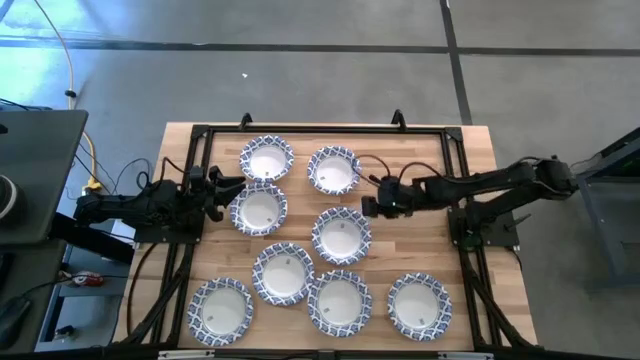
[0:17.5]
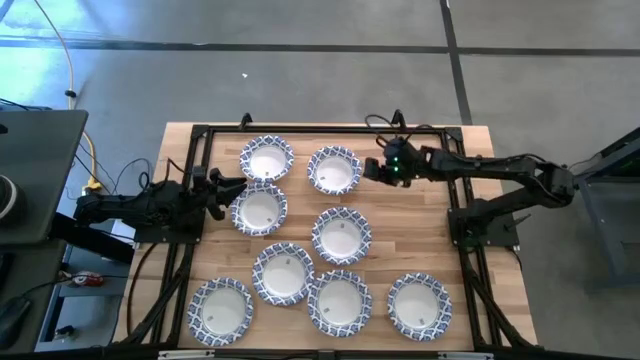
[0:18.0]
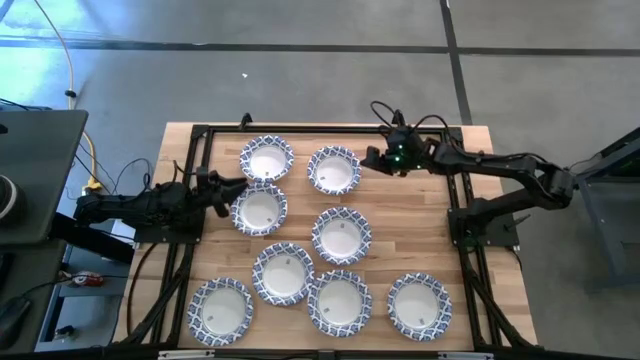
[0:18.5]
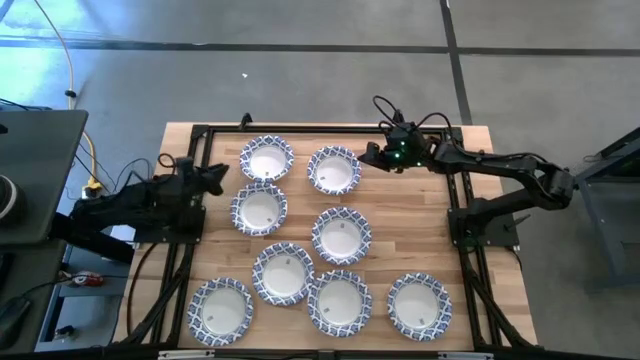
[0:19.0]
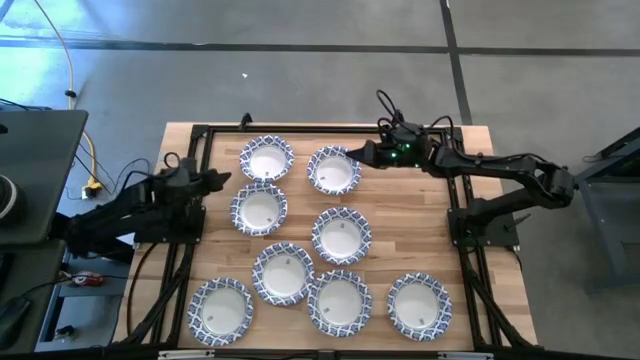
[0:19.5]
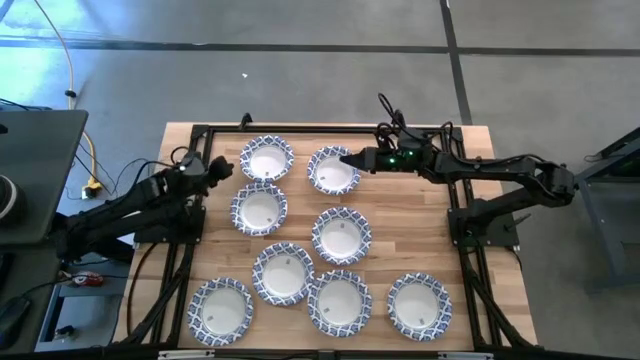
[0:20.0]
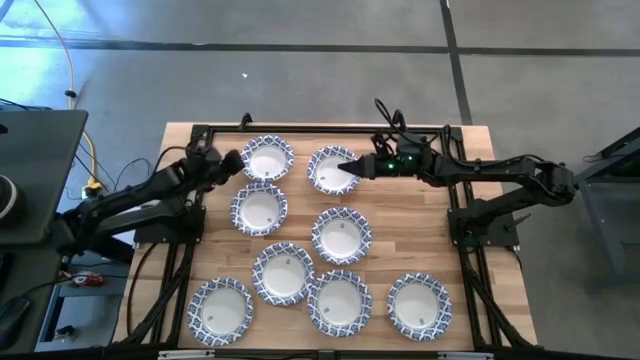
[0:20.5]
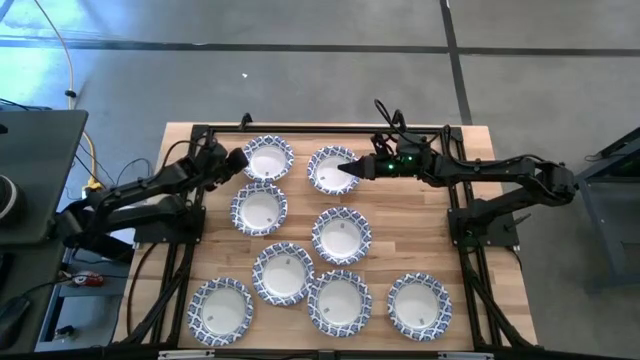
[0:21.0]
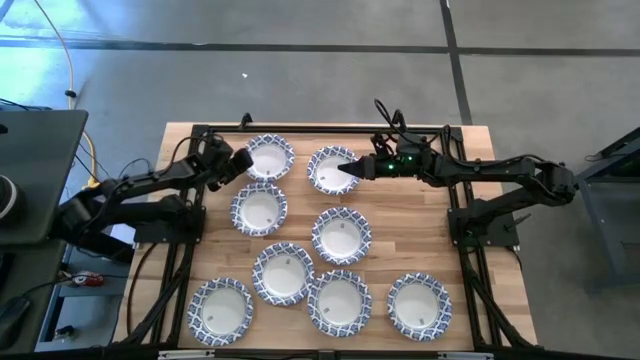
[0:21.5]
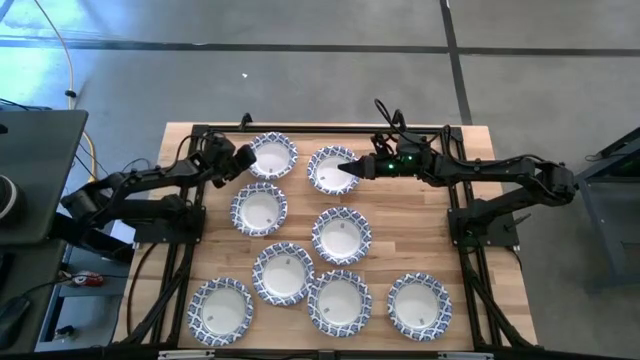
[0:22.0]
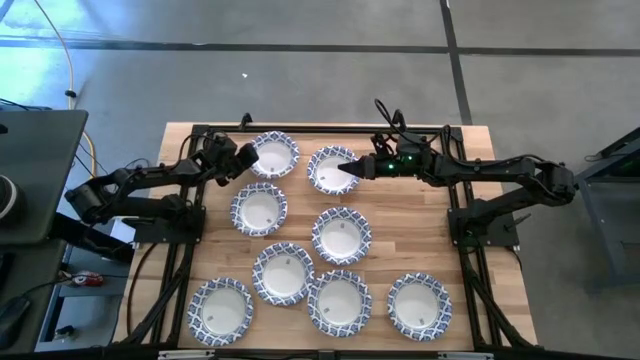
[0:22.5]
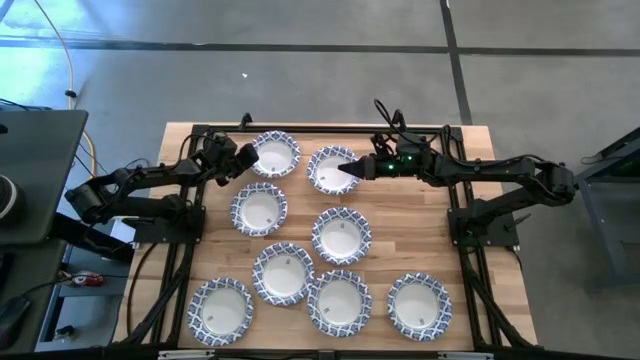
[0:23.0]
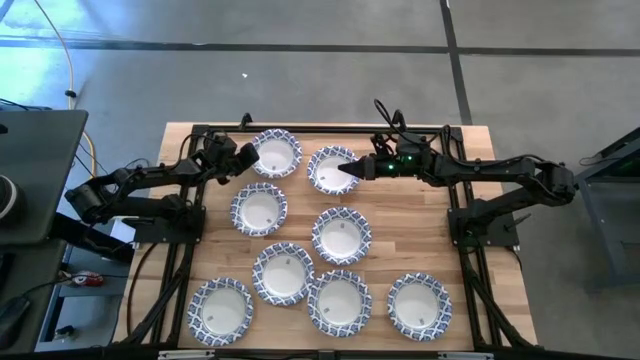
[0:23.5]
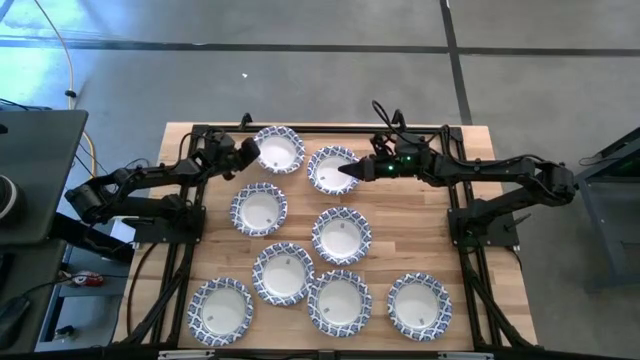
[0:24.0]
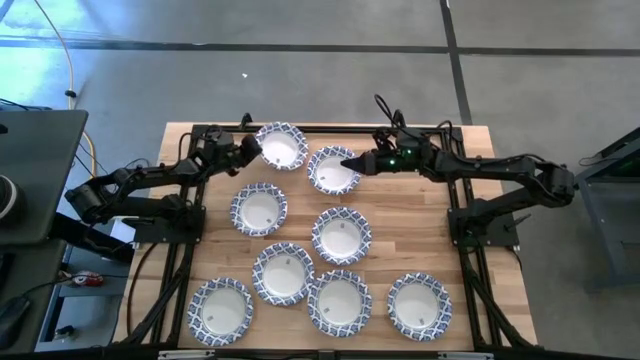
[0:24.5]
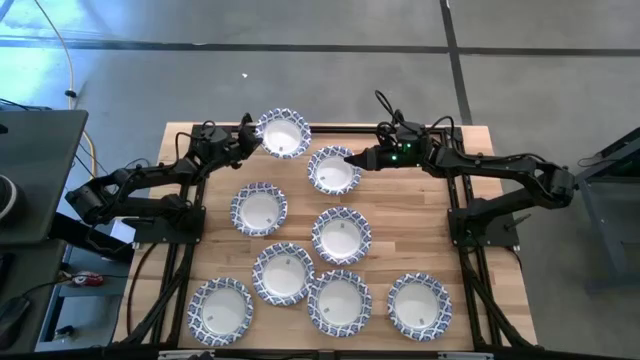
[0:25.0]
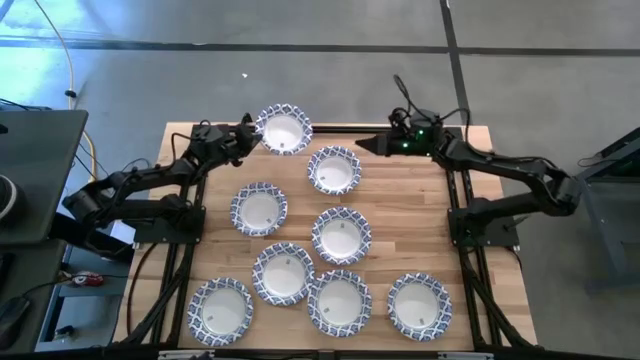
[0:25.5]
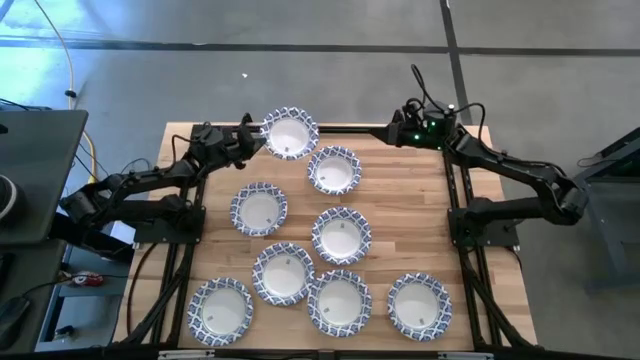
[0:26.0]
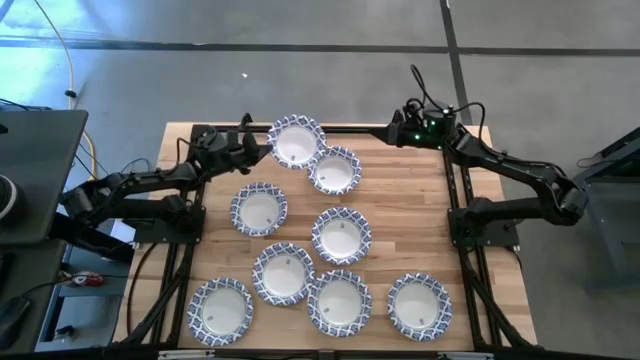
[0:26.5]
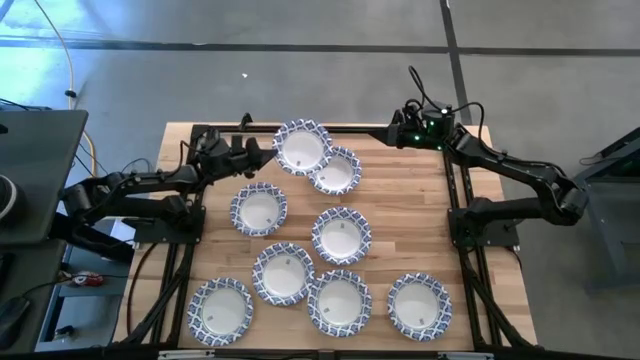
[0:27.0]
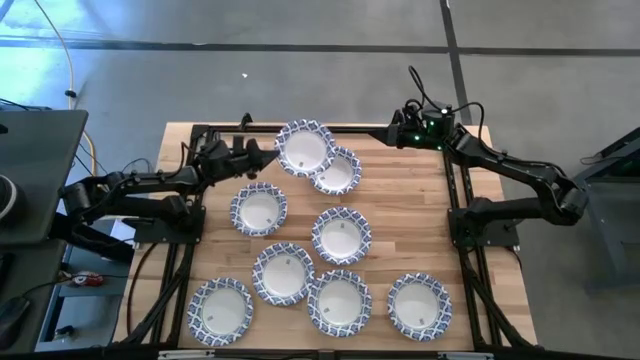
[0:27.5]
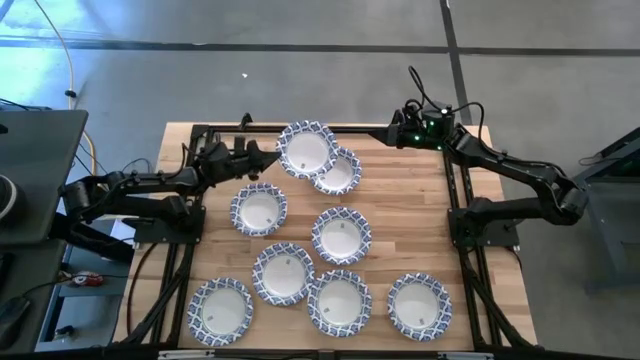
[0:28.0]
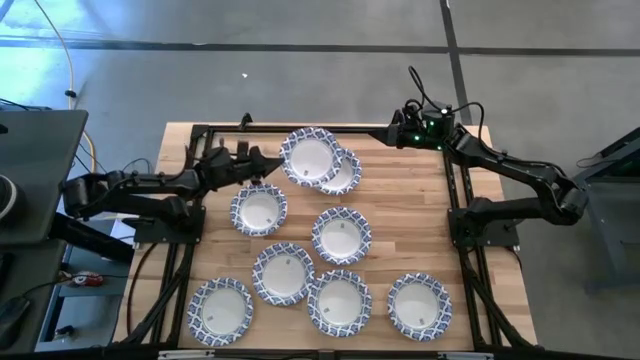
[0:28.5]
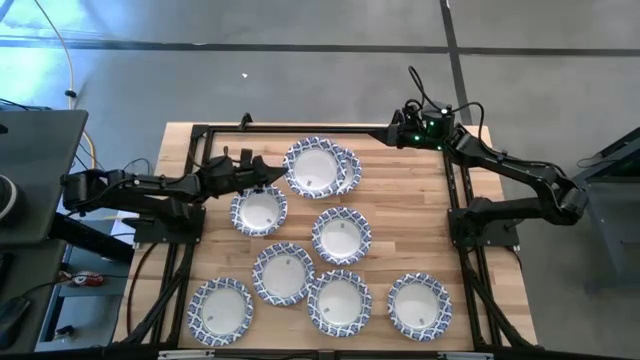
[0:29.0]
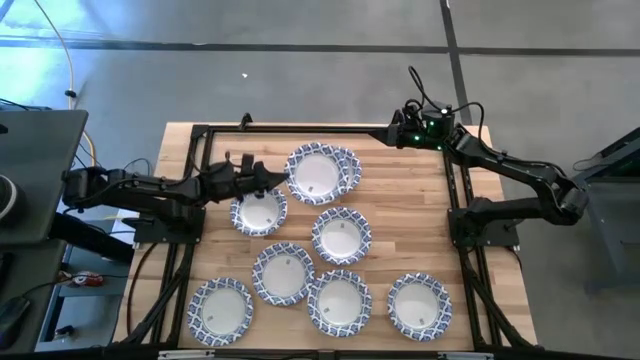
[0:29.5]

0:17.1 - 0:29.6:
Task: Nest bowls inside each other
Stack the white patterned bowl on top of the other white patterned bowls

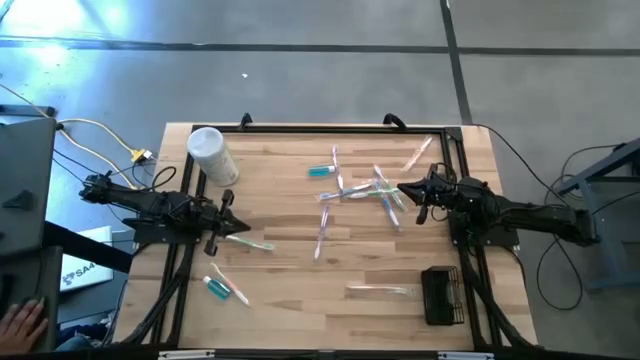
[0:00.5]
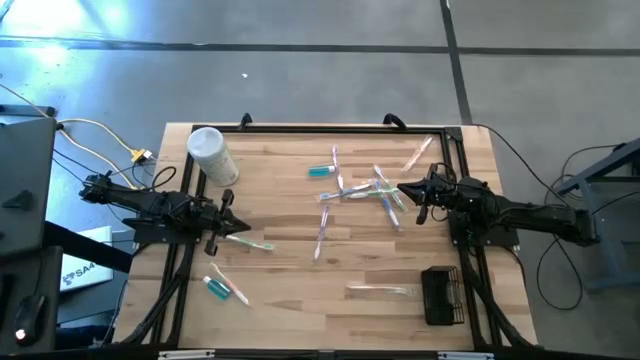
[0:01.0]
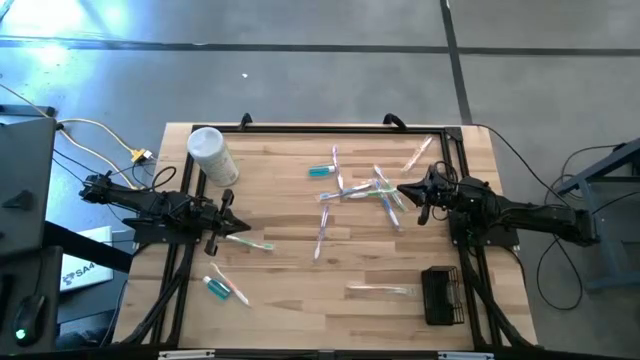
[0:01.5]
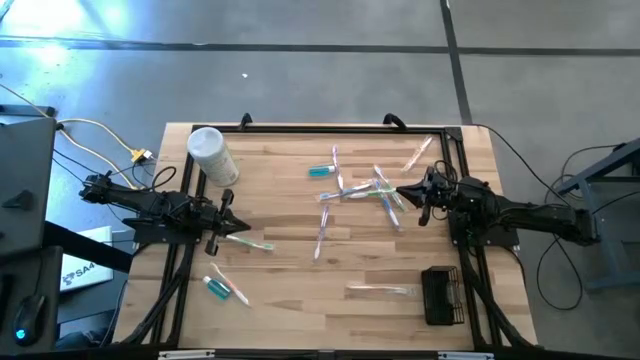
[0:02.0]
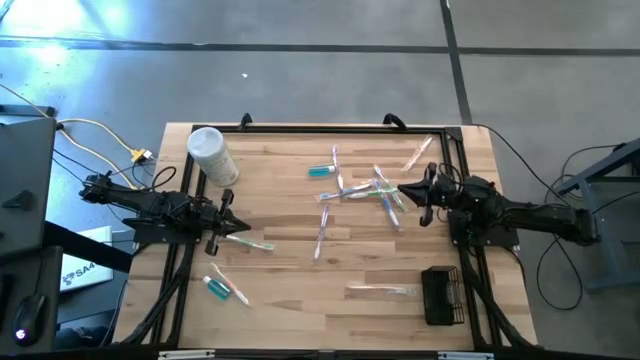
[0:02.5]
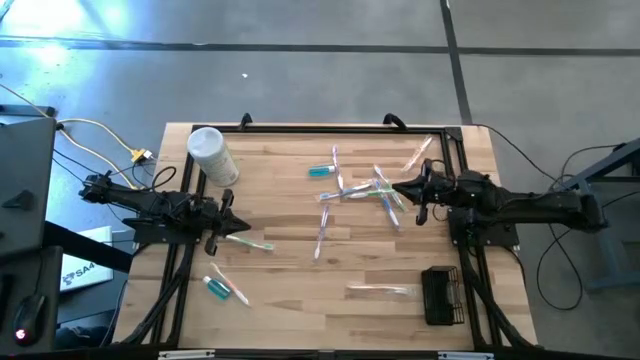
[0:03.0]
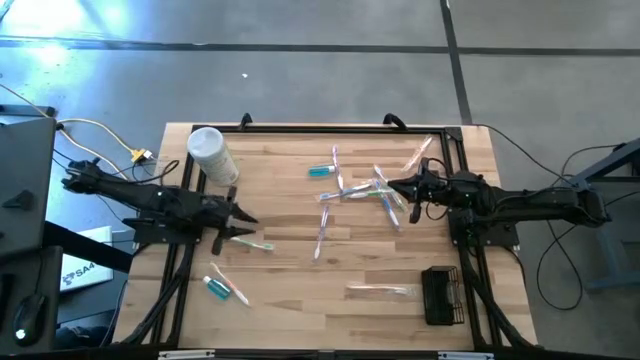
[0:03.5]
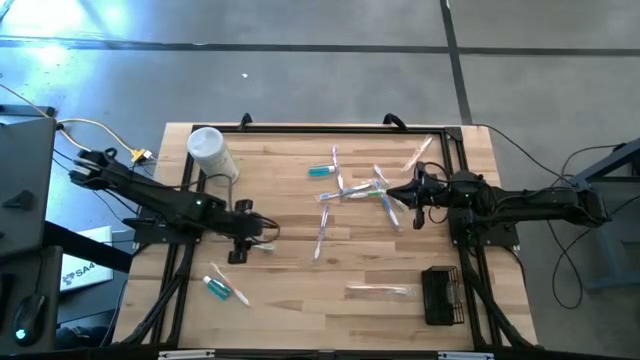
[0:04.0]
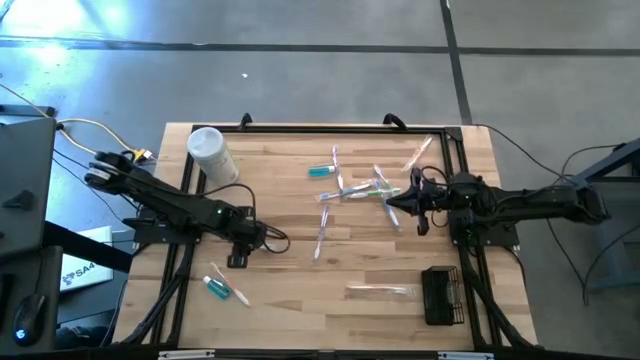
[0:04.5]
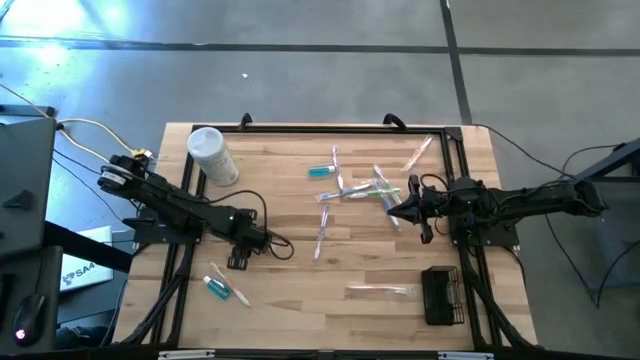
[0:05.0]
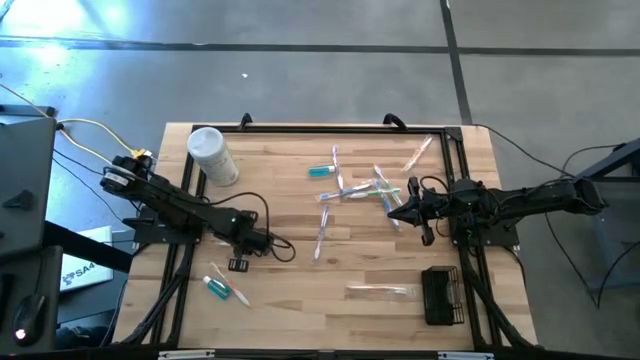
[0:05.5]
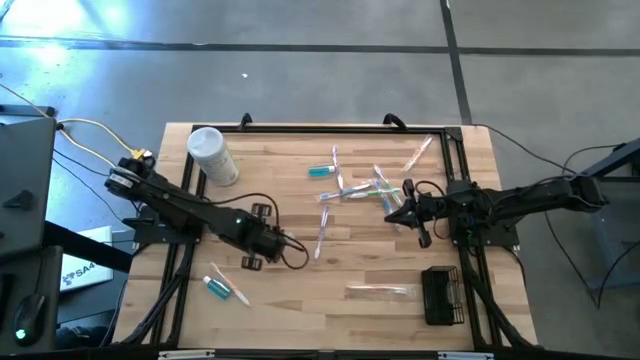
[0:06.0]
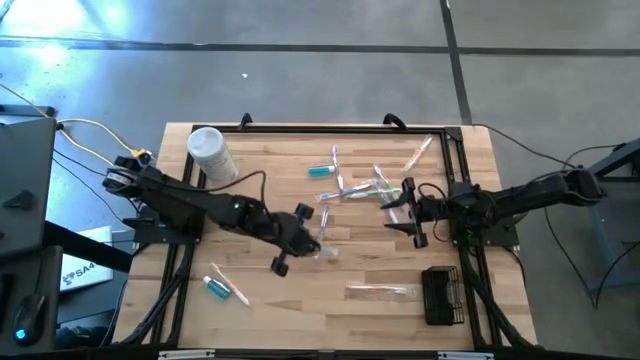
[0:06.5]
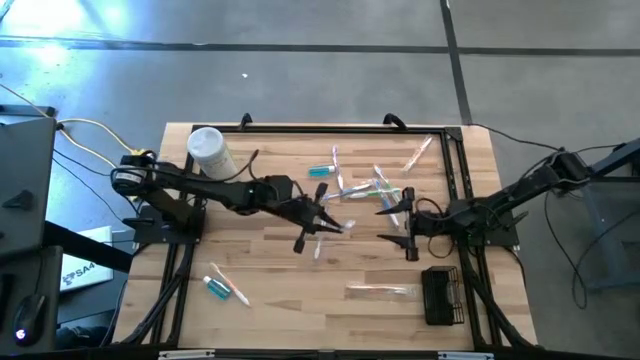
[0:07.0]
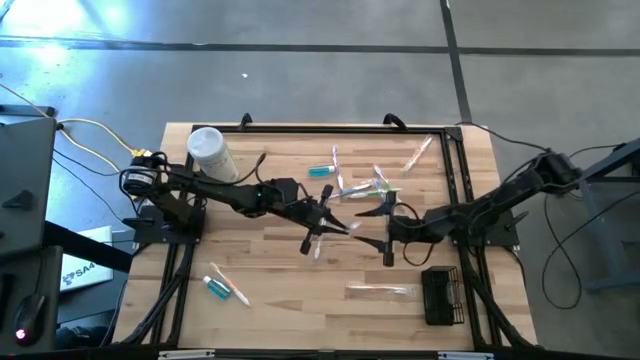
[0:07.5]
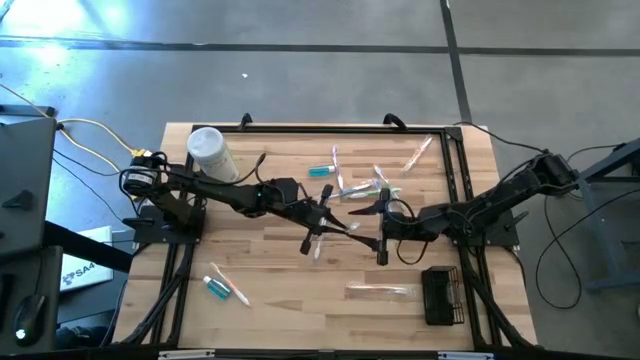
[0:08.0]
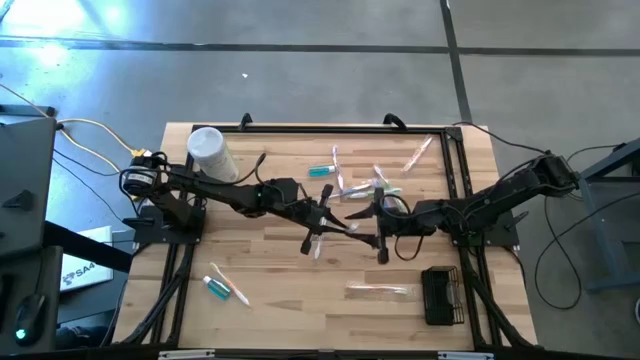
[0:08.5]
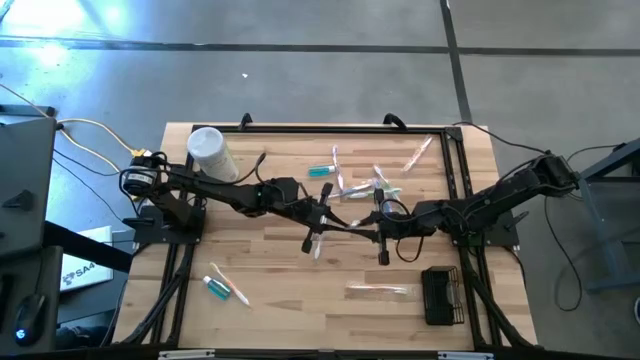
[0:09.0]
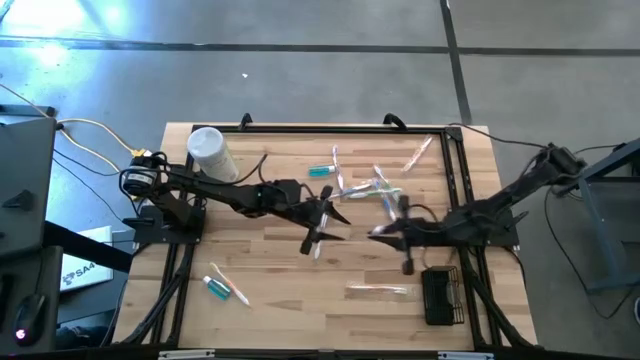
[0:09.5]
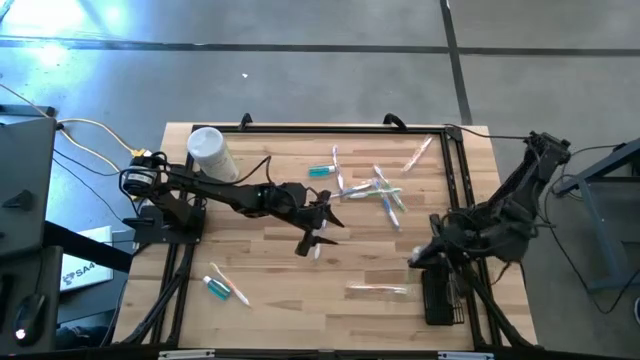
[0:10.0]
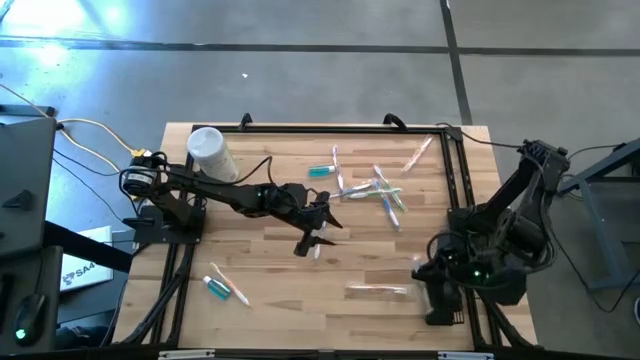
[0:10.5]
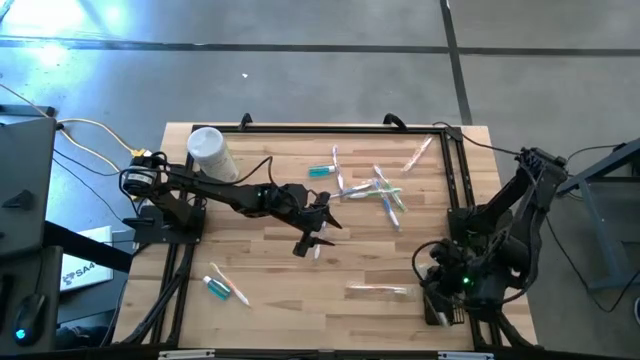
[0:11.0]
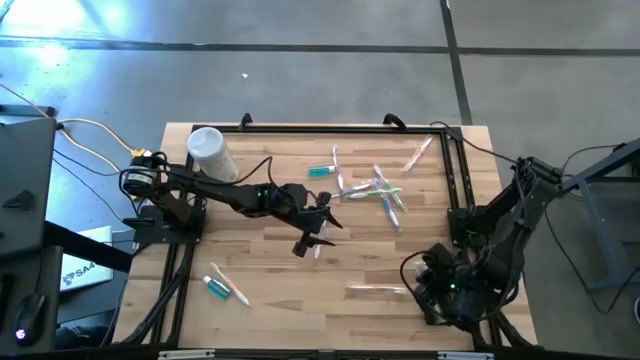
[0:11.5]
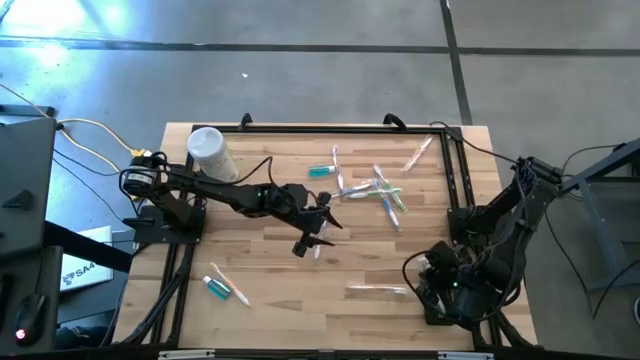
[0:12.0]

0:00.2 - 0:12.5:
Task: Pick & Place toothbrushing station
Put the bottom green toothbrush into the black mesh
